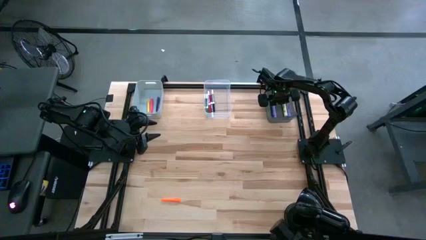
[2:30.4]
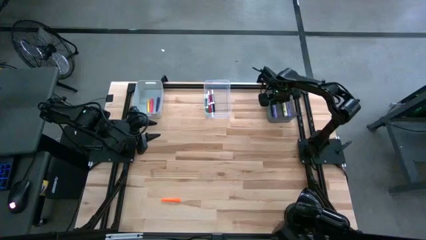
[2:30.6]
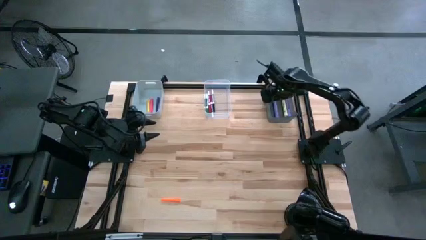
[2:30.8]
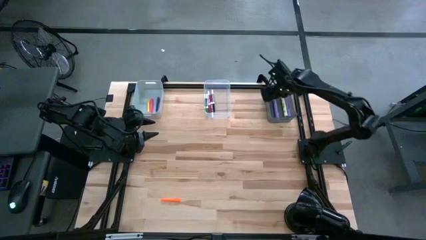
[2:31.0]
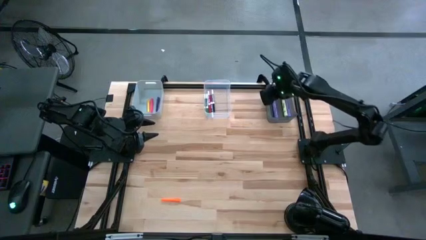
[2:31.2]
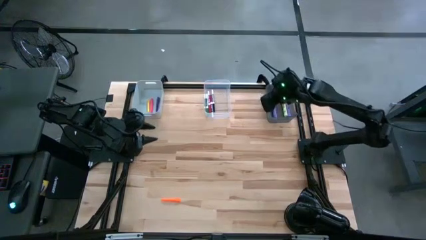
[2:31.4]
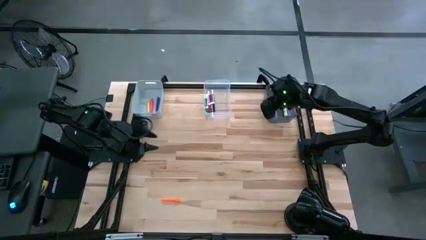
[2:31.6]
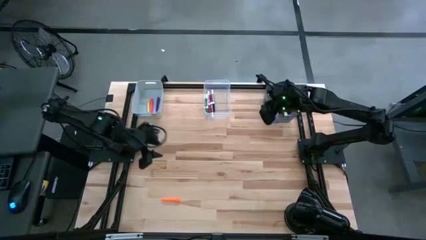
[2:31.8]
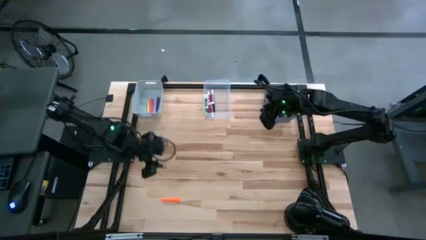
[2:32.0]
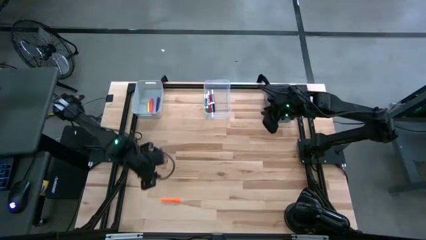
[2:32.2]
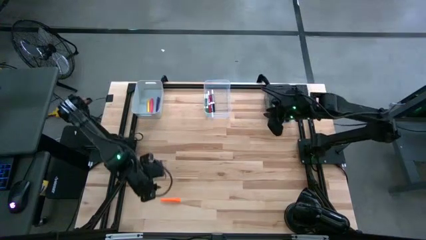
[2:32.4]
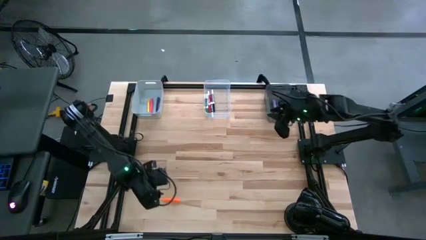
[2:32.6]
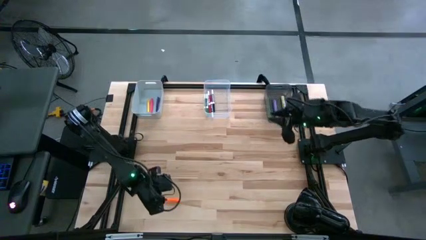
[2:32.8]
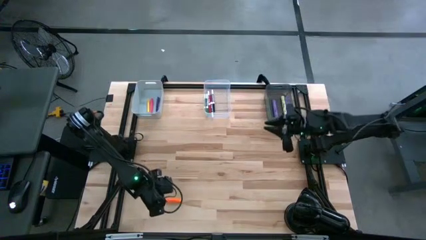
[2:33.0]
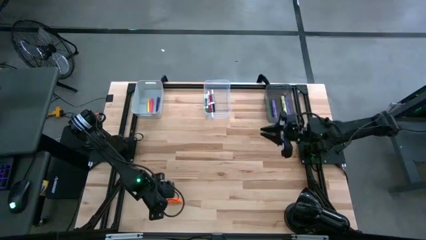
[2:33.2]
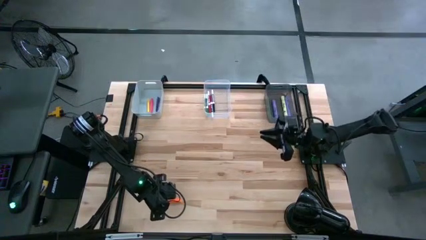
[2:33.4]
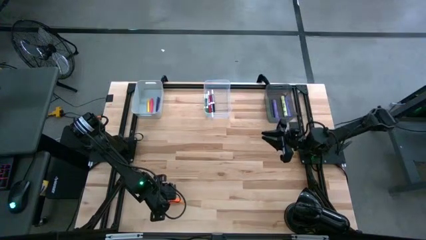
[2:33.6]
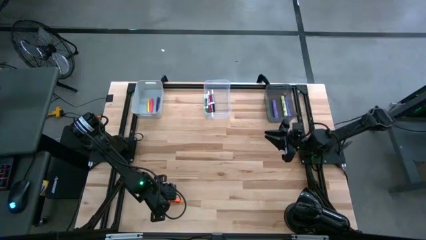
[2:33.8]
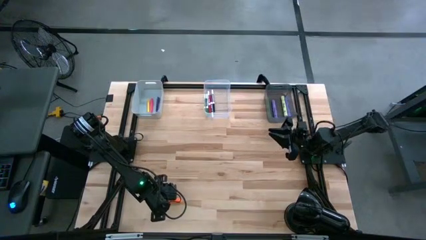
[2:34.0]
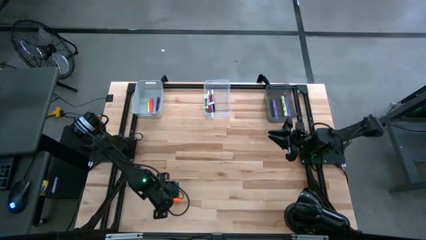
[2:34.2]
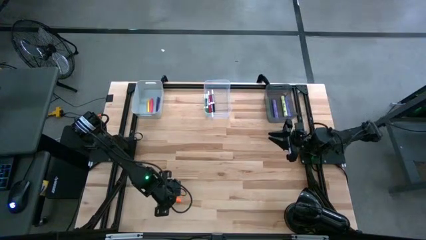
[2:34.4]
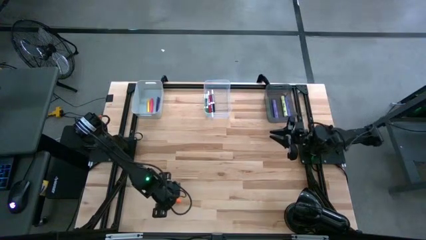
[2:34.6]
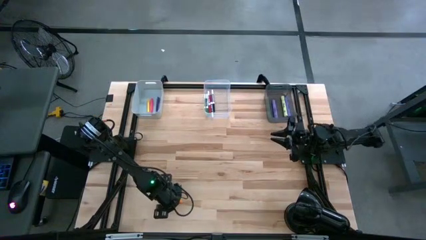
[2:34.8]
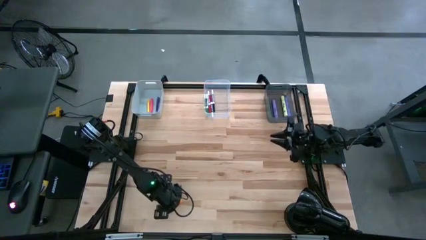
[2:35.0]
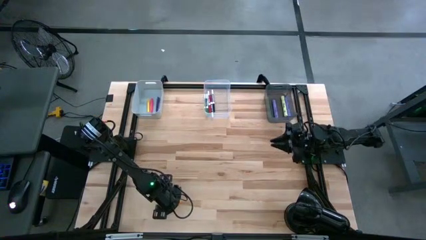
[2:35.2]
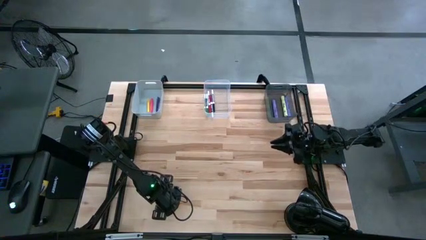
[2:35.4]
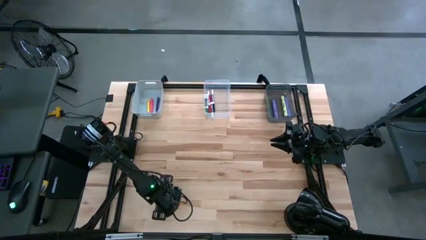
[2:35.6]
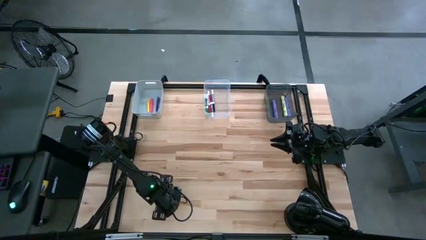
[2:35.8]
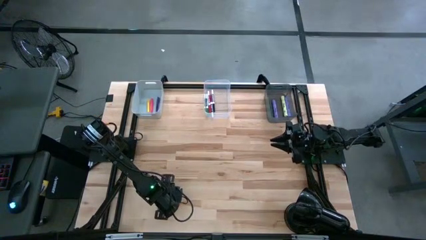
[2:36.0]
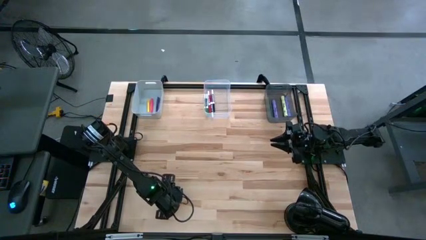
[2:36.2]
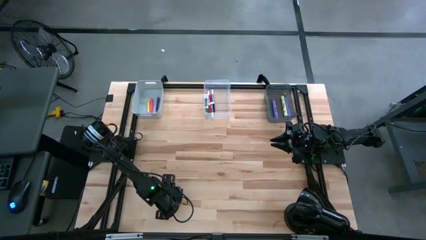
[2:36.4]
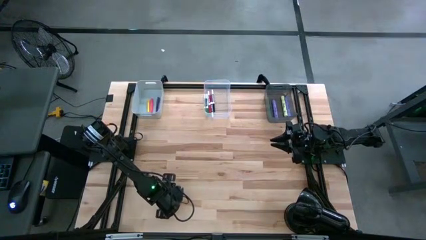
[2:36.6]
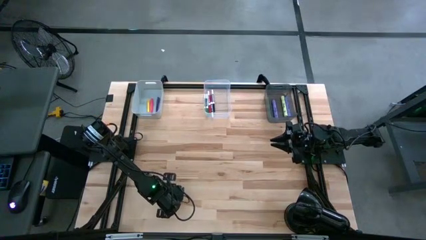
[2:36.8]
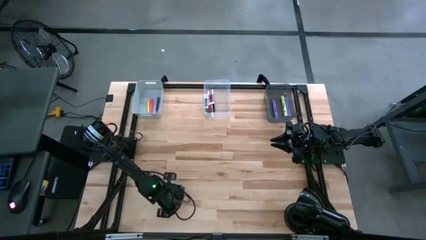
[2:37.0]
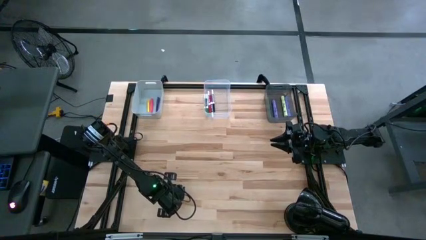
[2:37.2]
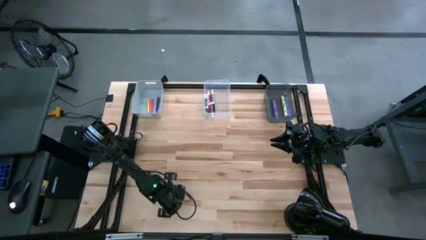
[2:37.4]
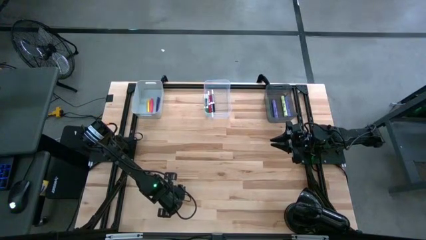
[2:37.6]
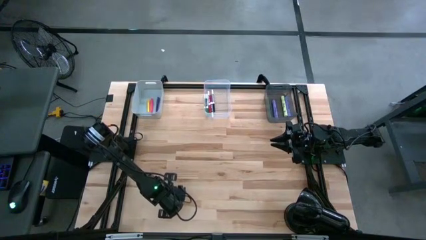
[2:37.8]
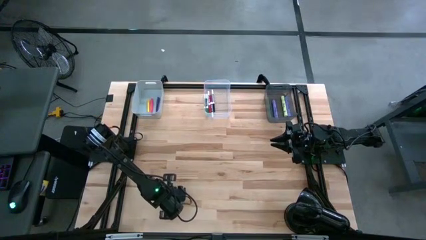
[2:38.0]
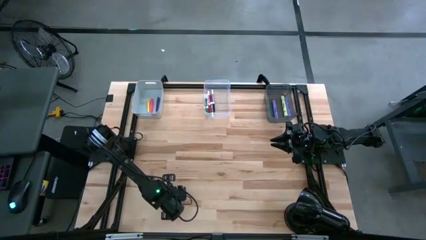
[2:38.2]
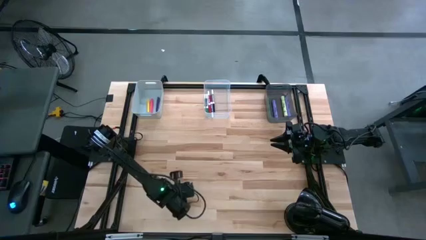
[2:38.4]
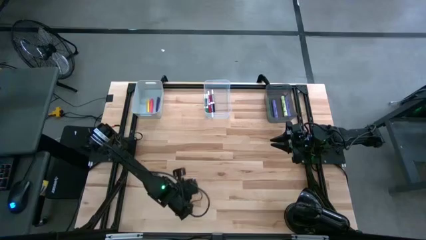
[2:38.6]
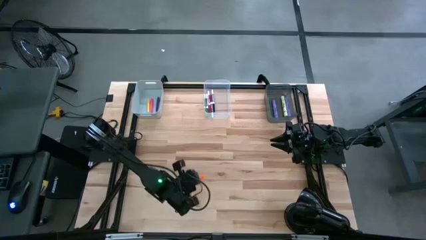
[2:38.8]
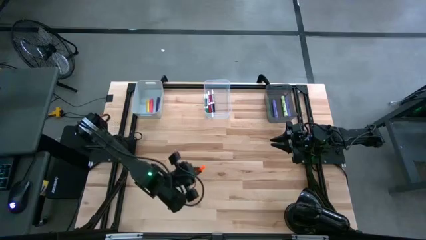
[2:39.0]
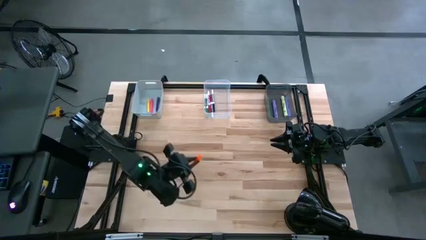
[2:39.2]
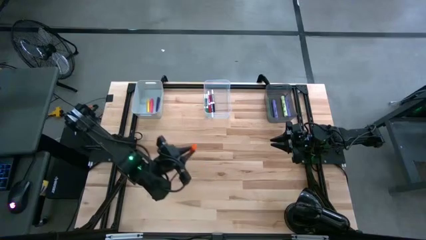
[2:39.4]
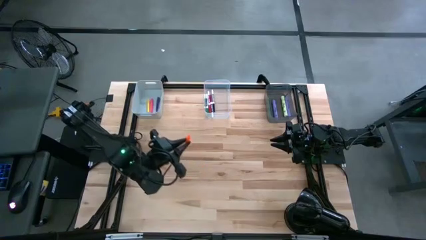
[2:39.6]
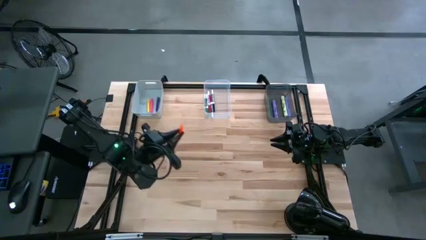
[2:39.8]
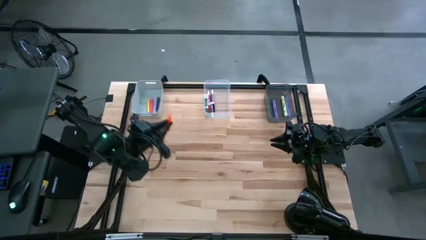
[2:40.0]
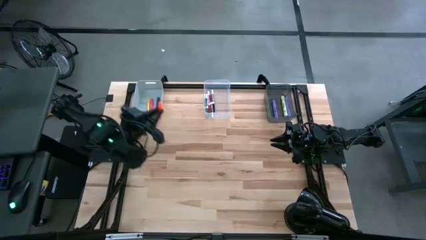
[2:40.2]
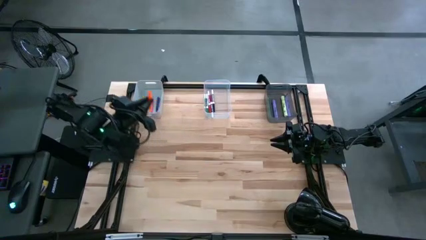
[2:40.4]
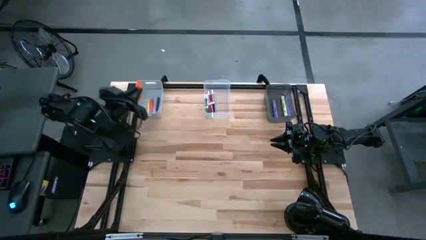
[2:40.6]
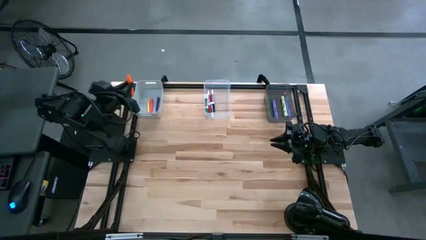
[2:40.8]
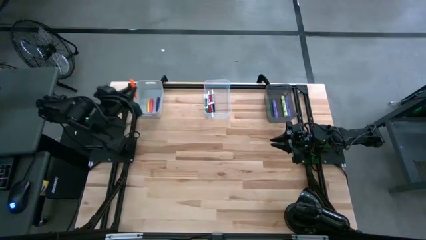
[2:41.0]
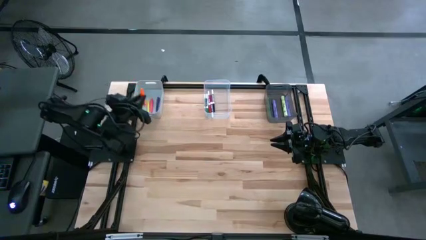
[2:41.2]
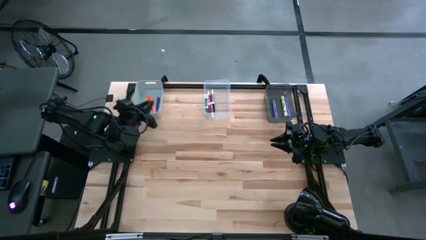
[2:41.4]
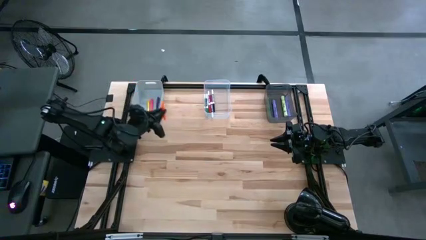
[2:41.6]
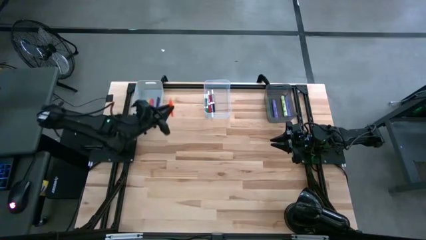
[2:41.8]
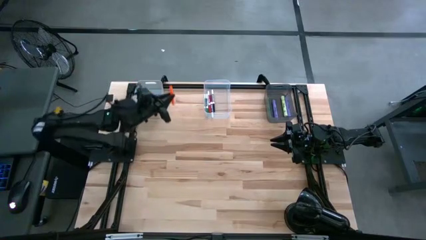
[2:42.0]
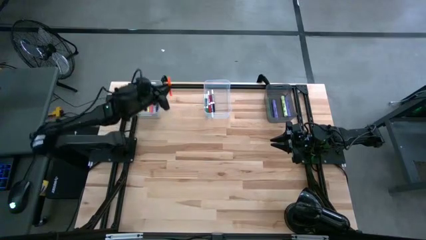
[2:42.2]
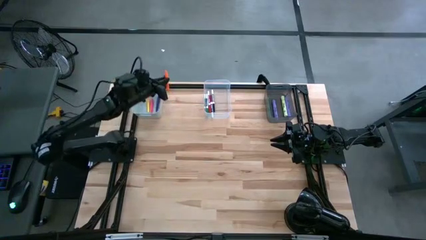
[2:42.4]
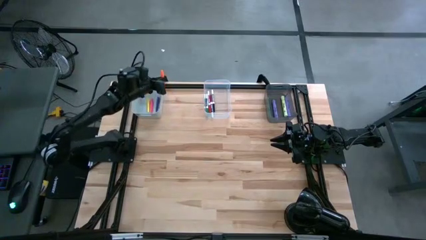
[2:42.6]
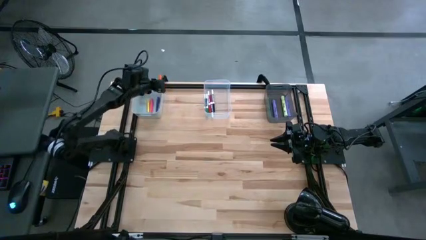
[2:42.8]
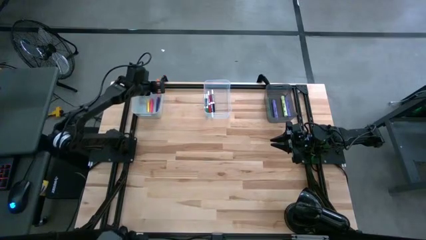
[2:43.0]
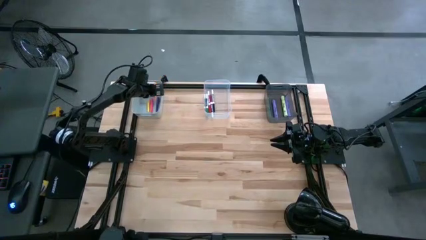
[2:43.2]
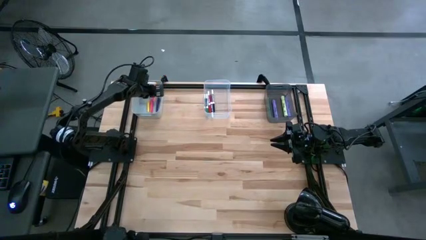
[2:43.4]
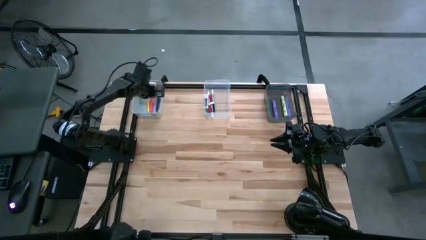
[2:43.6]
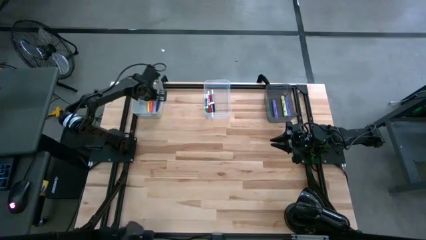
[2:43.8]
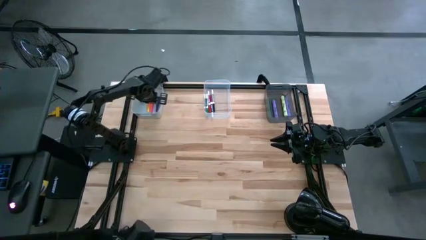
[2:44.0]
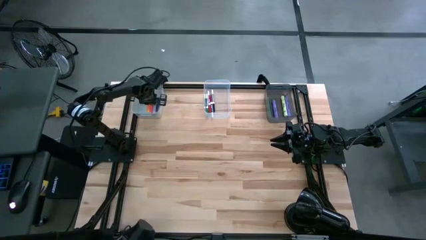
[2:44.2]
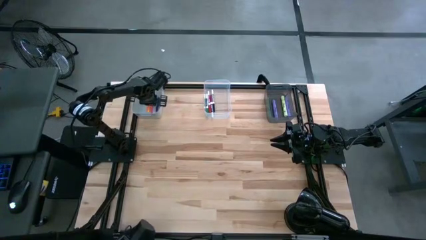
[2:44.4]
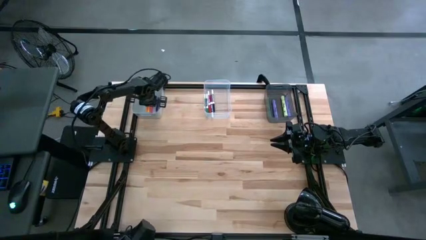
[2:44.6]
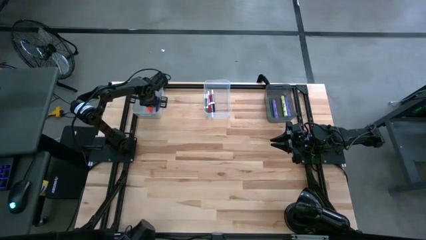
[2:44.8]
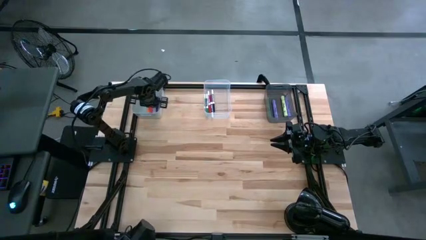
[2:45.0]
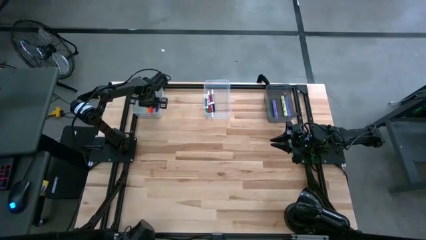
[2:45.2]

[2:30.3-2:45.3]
Task: Pick & Place Markers
Put the orange pen into the gray bin
